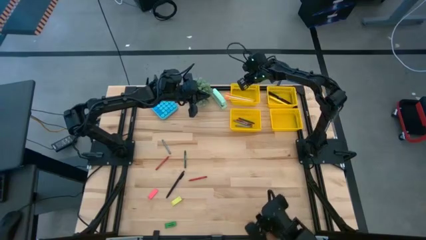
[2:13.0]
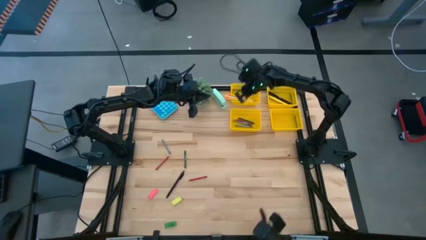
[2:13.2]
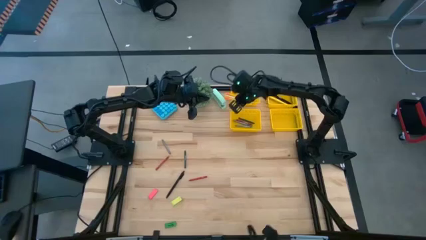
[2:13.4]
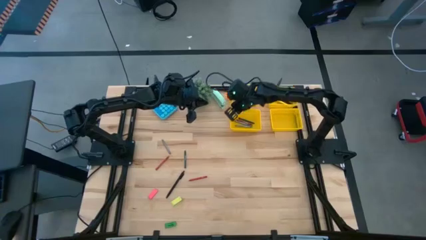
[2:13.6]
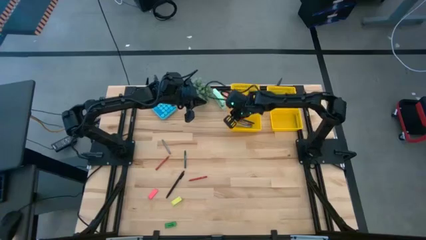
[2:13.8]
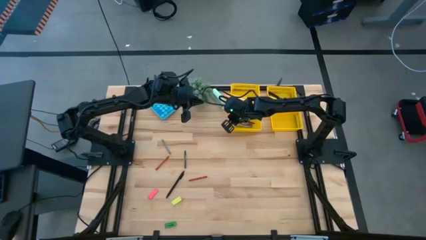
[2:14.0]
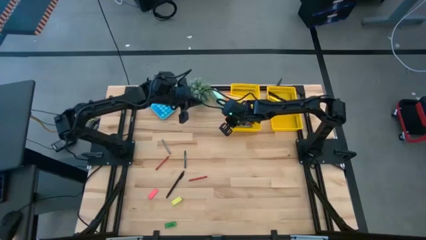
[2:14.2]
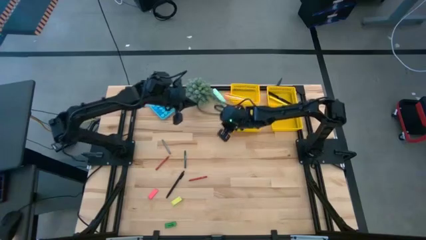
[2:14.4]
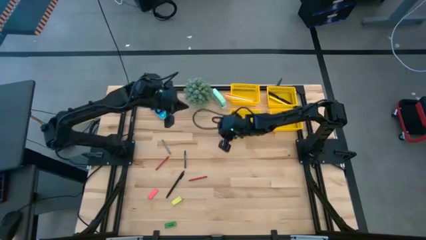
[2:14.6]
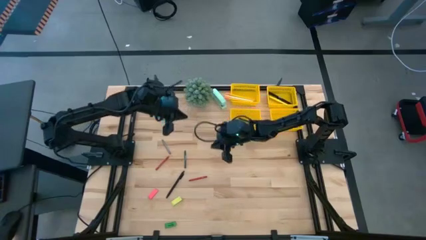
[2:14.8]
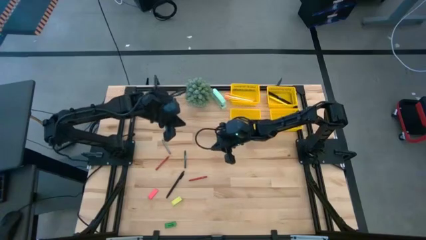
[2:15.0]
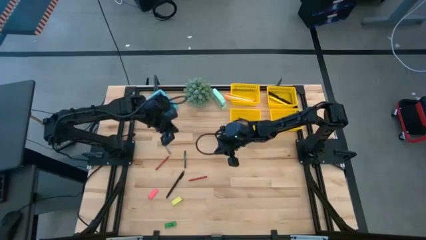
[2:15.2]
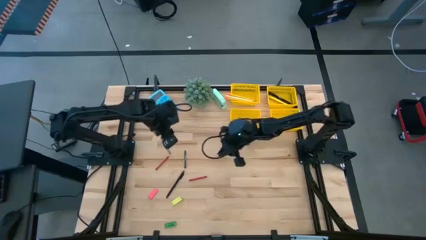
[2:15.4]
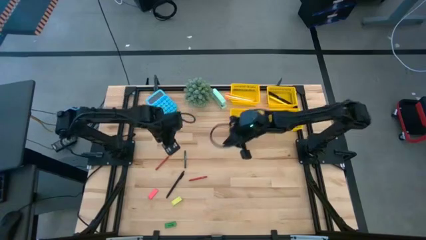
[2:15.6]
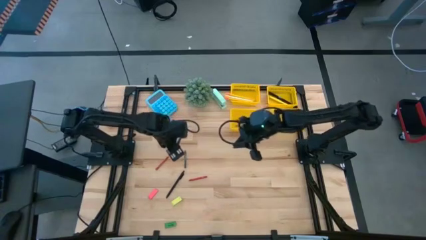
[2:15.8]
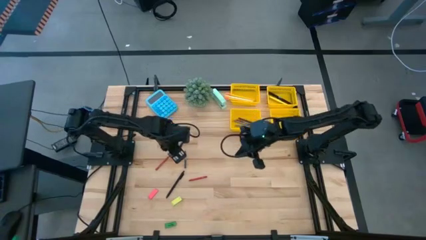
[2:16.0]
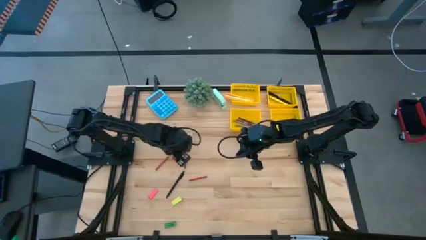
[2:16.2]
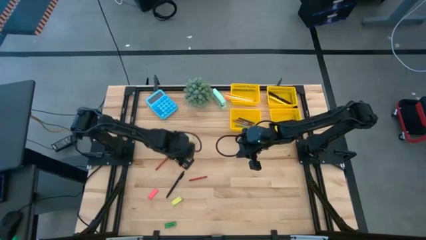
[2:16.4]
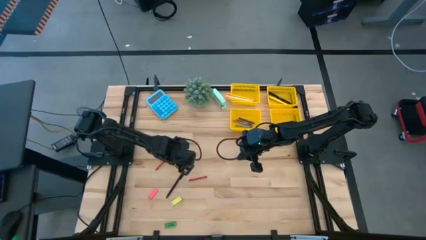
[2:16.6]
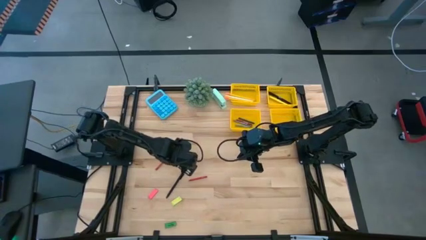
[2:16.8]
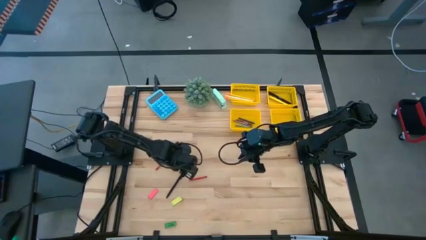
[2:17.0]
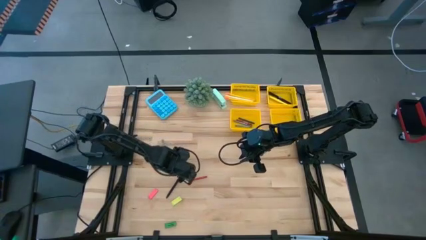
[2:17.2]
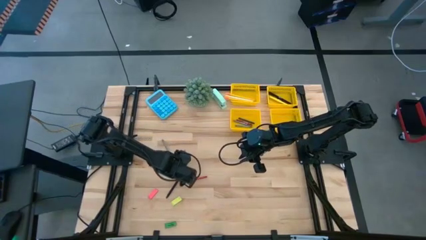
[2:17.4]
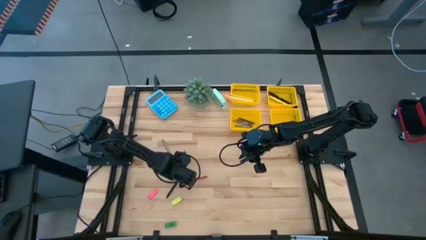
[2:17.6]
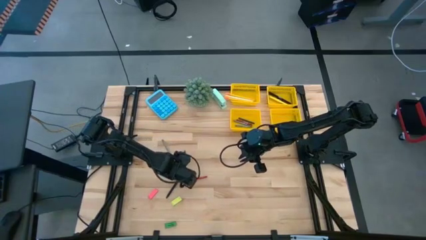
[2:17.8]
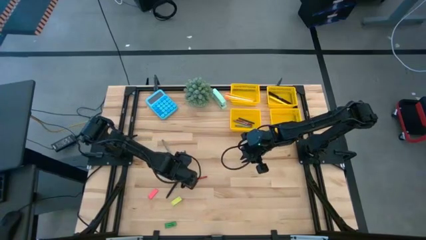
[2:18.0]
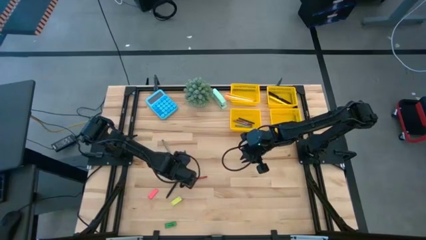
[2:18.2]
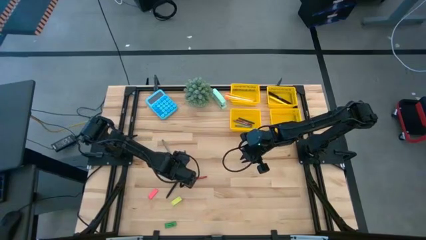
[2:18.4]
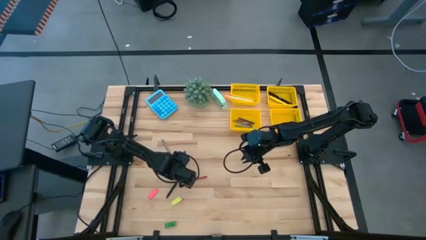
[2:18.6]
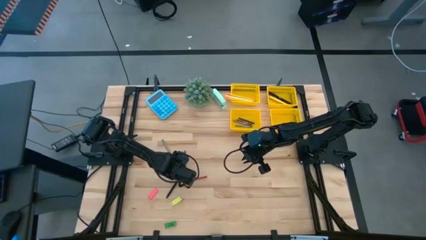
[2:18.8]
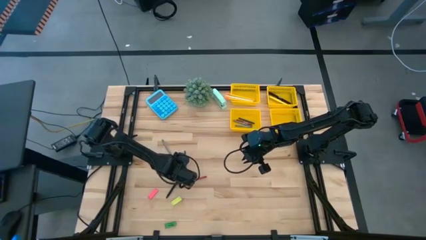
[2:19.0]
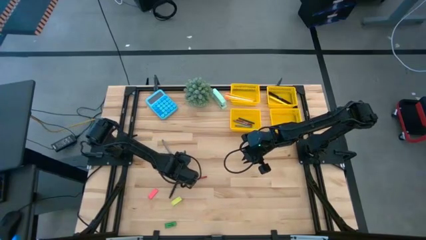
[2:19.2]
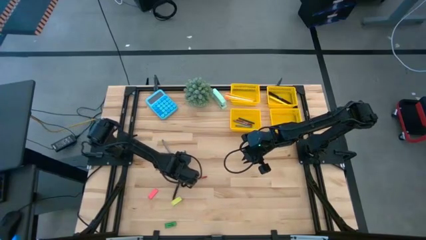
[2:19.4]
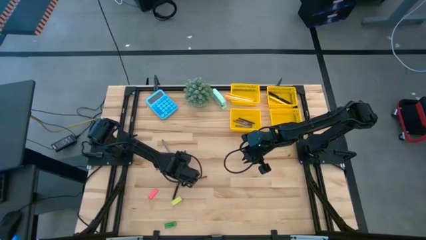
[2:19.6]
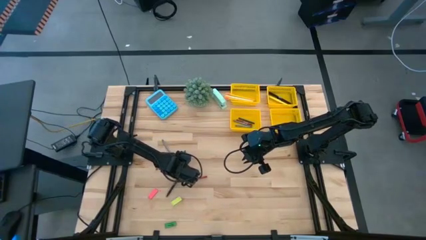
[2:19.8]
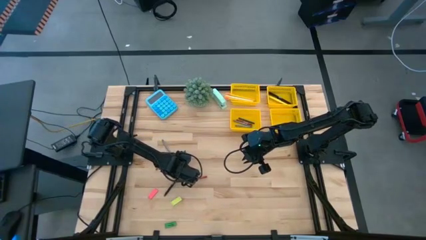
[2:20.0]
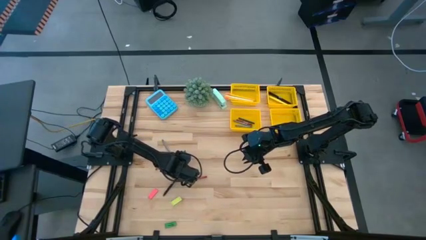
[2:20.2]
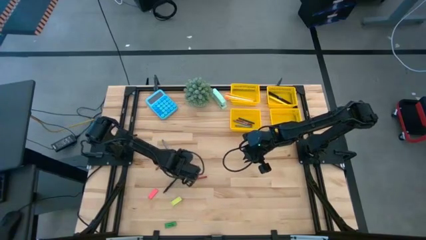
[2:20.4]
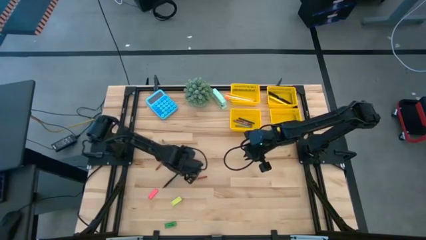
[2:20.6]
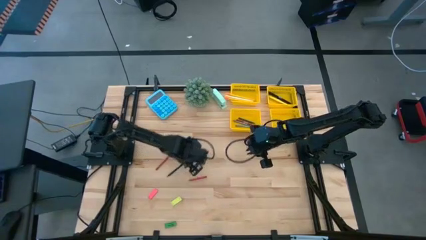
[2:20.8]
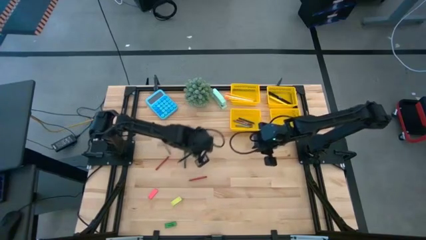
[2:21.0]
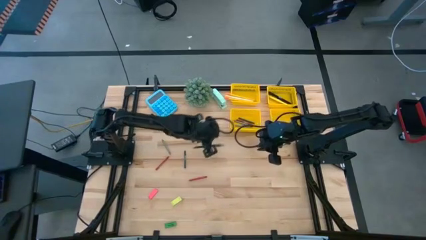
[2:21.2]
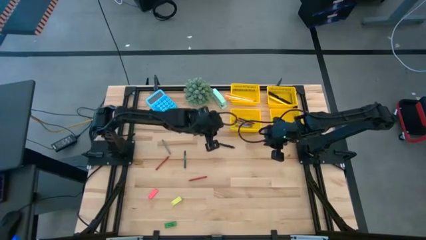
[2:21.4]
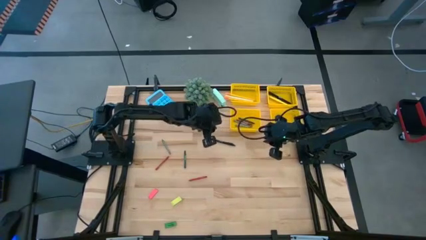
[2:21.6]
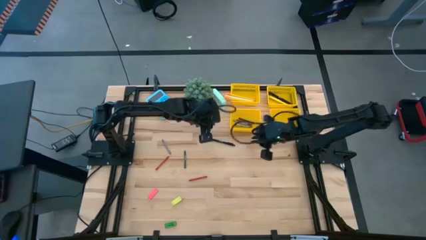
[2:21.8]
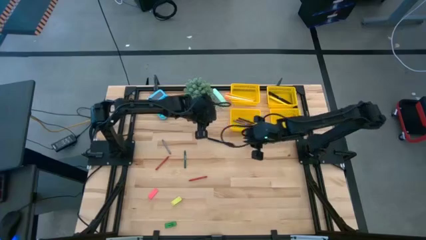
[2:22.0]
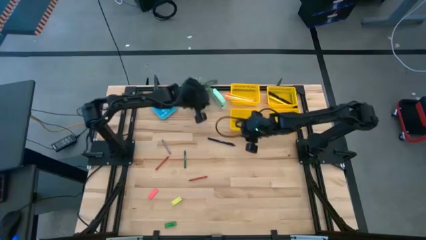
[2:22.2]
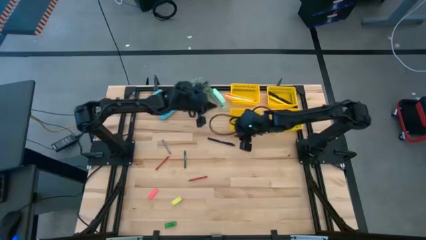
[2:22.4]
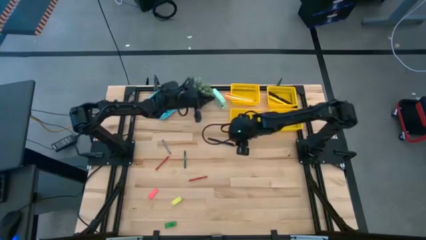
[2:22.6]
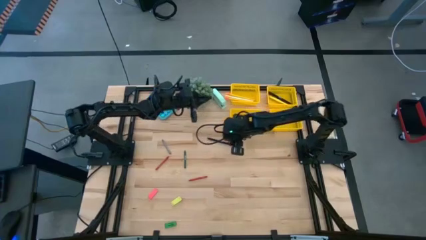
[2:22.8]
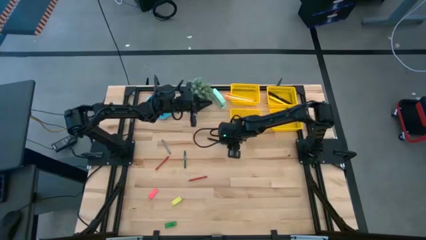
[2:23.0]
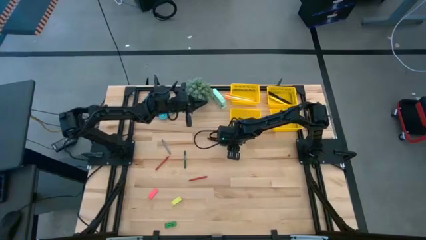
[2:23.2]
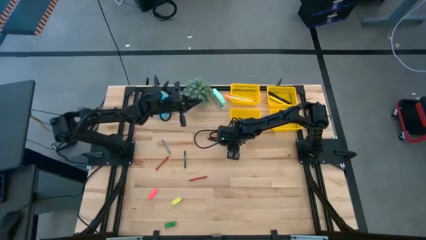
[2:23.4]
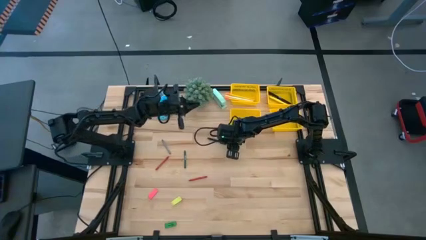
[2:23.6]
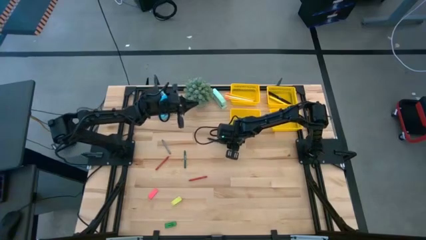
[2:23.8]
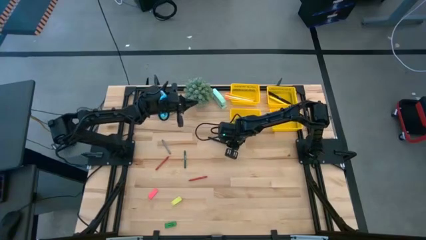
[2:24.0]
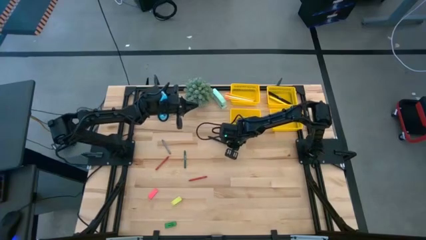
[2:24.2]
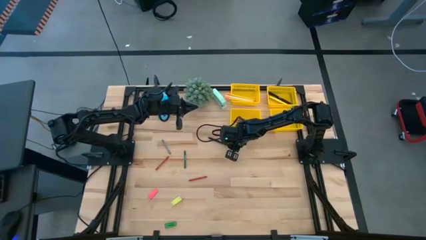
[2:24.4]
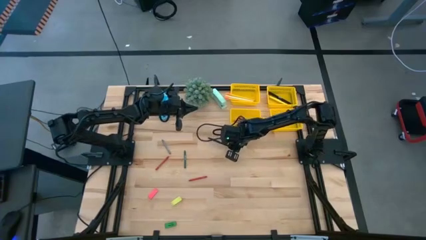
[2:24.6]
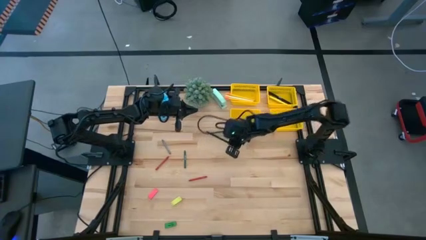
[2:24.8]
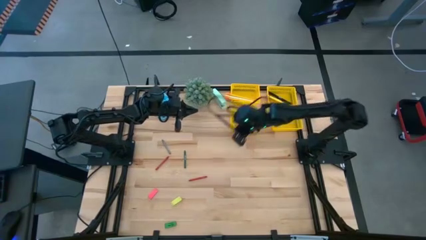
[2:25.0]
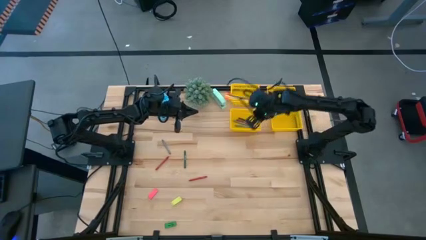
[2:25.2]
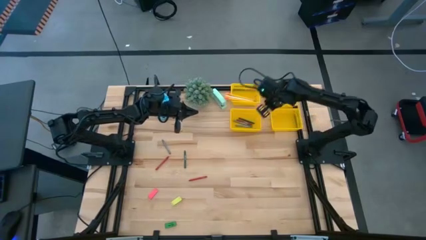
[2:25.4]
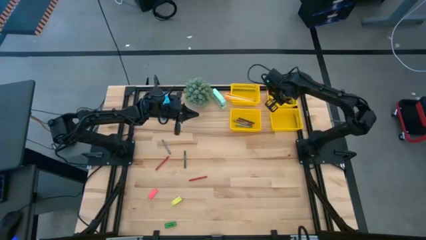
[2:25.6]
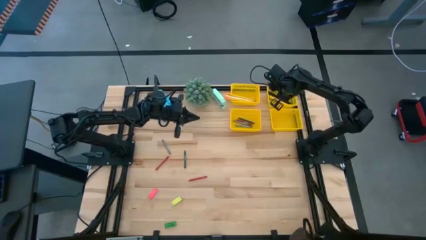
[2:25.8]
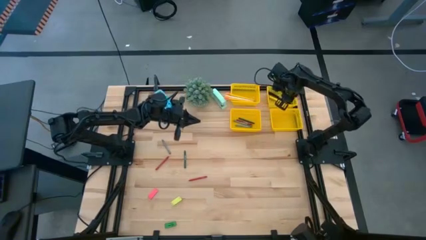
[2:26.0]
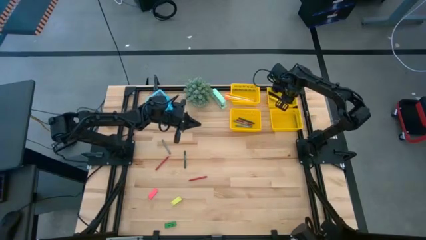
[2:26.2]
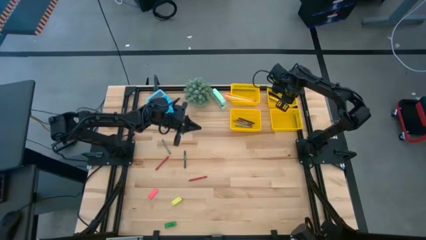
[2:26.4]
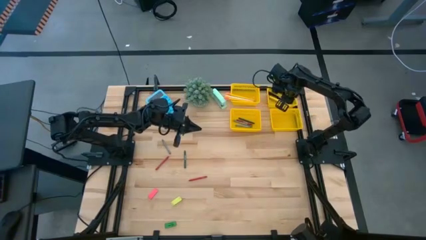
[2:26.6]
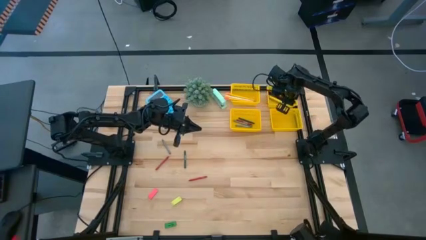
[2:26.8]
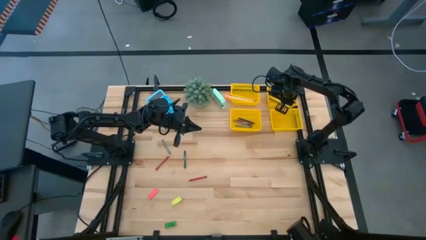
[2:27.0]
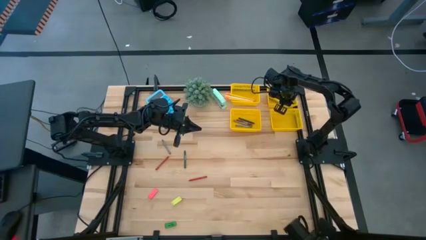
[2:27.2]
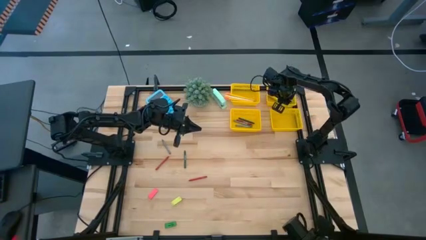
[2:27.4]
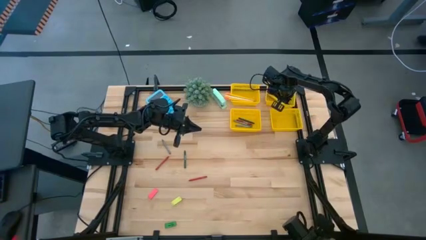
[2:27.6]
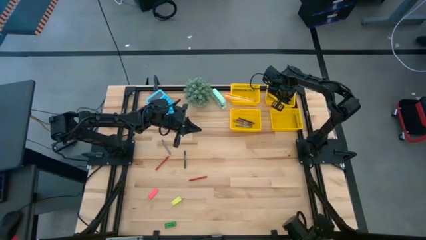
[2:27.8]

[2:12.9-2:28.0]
Task: Sort crayons/erasers/pens/pencils in bins
Put the black pen into the top right yellow bin
